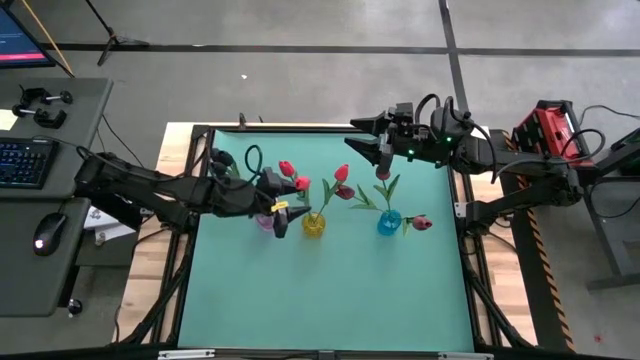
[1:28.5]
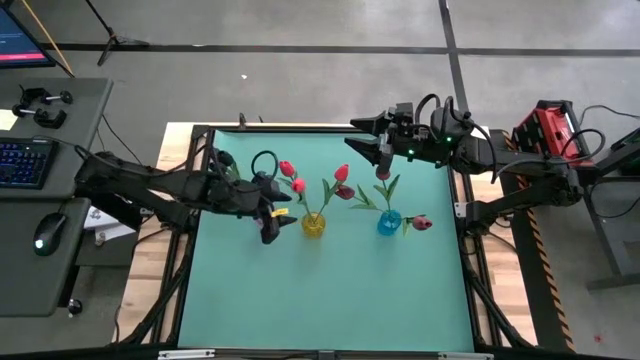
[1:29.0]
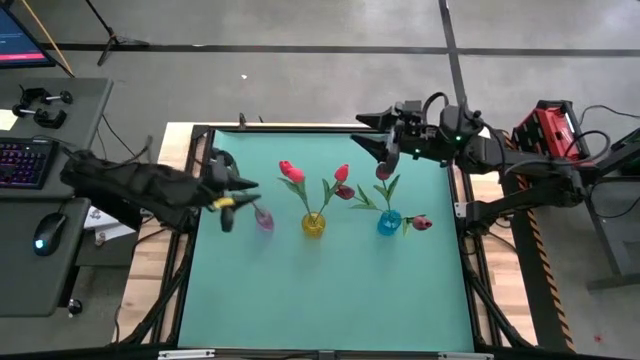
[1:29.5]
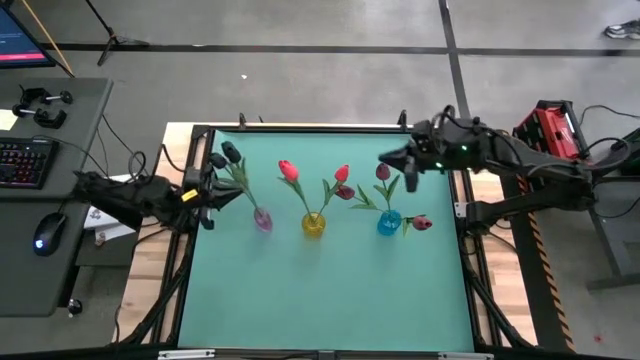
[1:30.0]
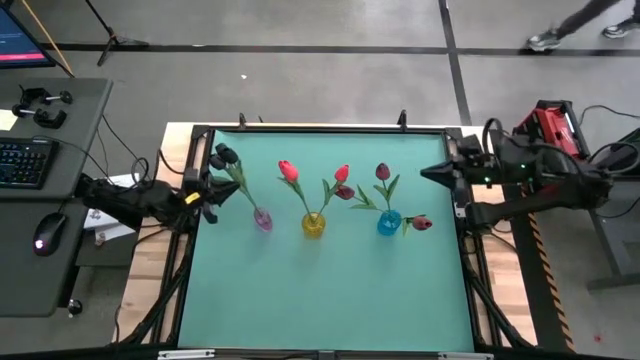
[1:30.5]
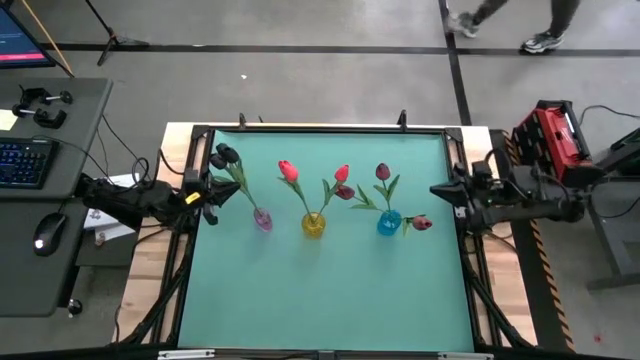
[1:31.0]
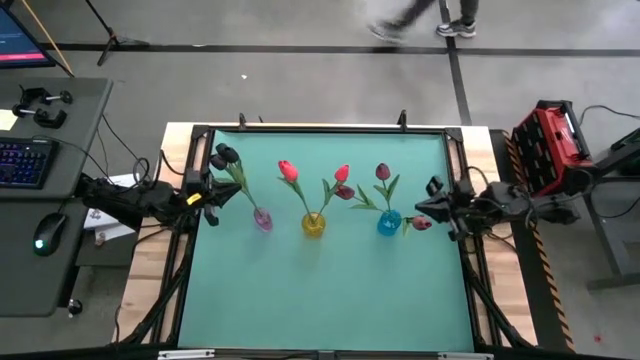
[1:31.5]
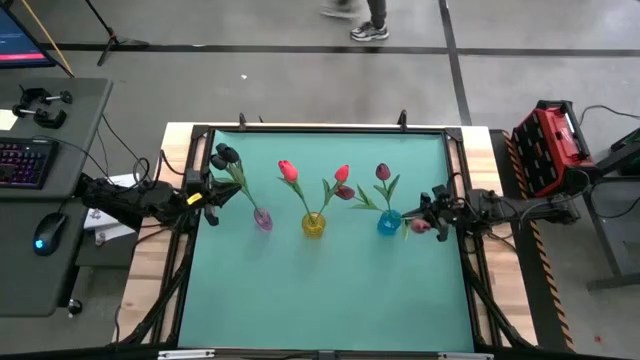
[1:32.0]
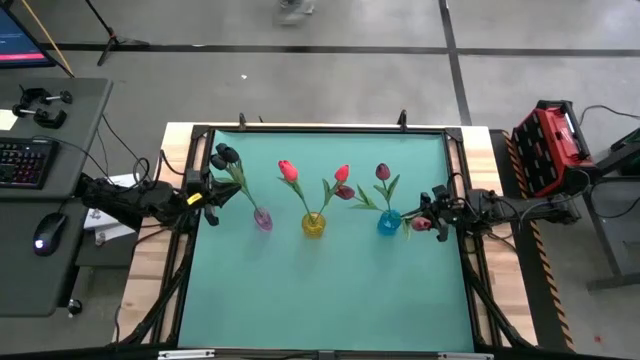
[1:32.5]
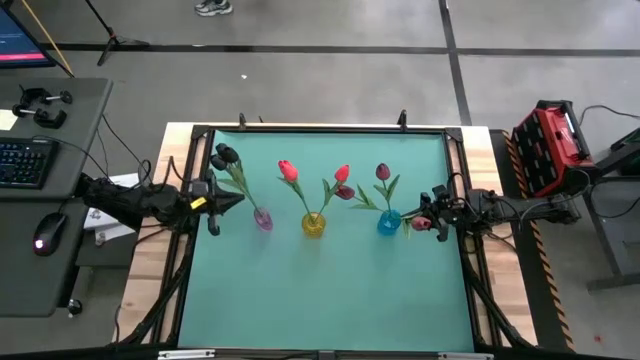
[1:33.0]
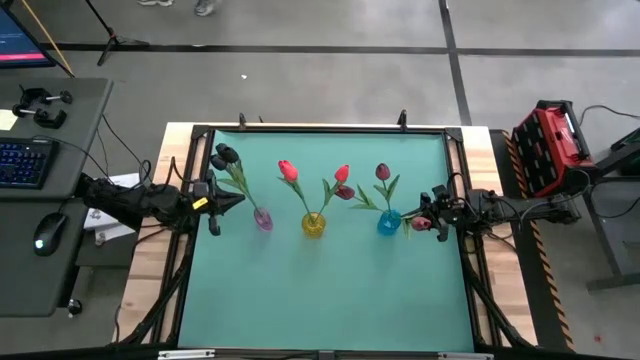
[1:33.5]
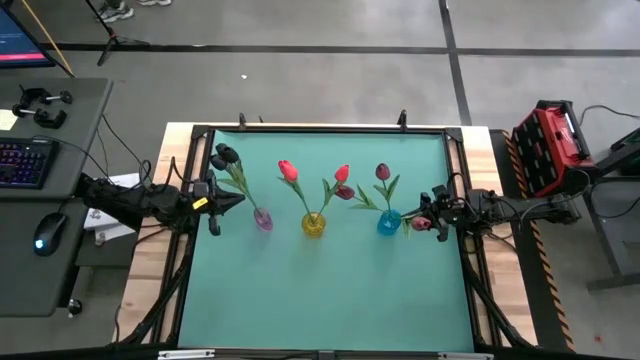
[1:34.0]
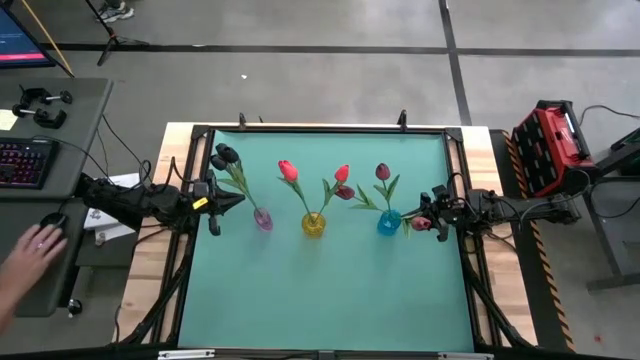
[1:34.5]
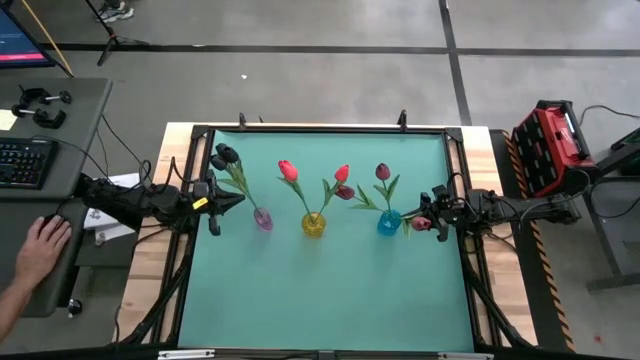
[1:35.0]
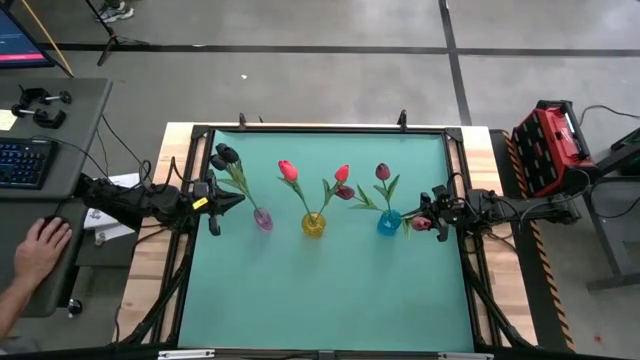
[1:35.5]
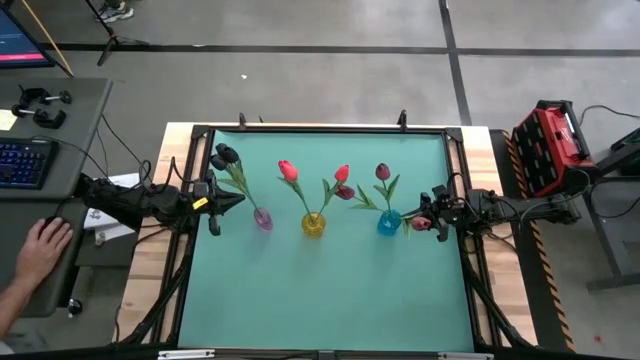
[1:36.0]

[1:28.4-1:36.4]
Task: Sort flowers into vase by color
Return to Home Position

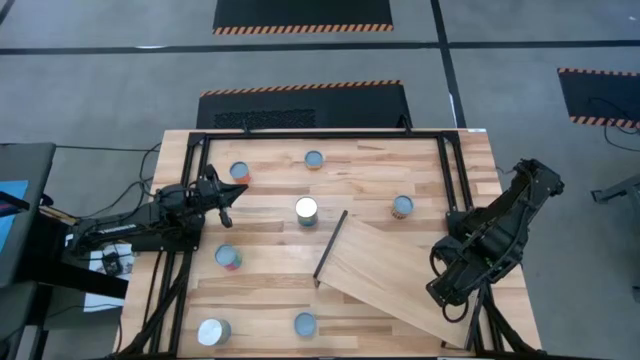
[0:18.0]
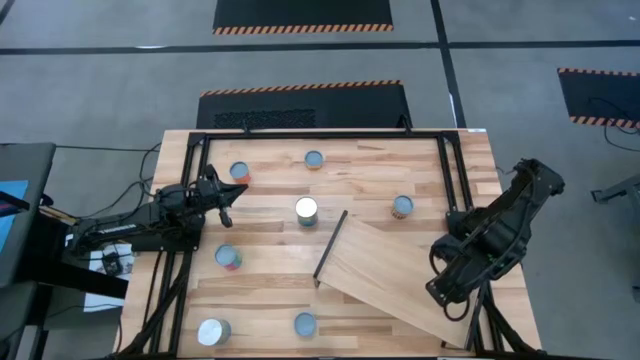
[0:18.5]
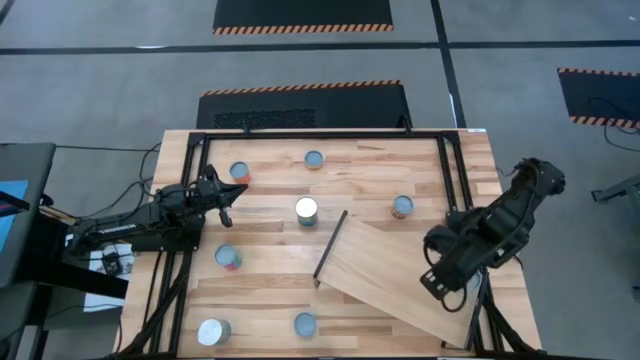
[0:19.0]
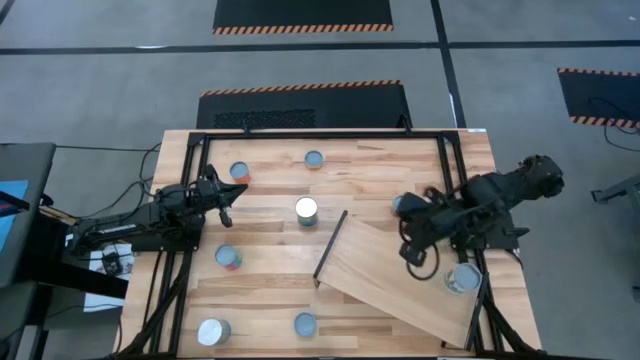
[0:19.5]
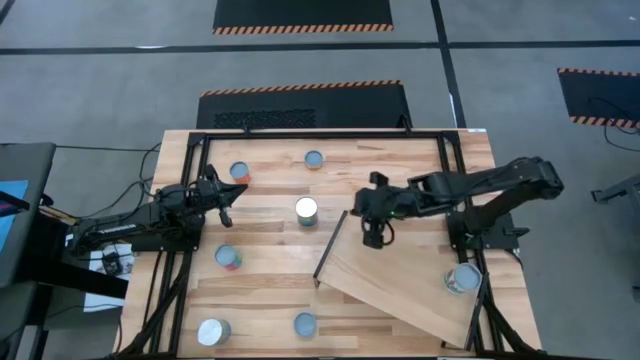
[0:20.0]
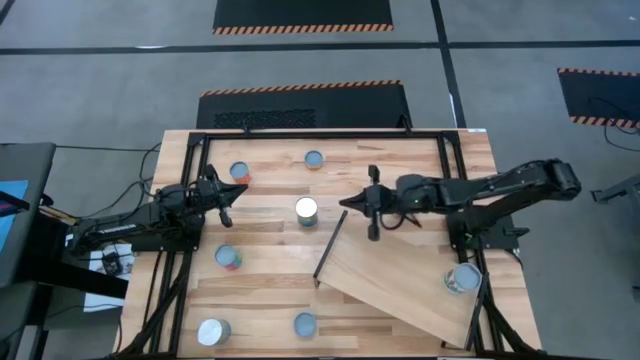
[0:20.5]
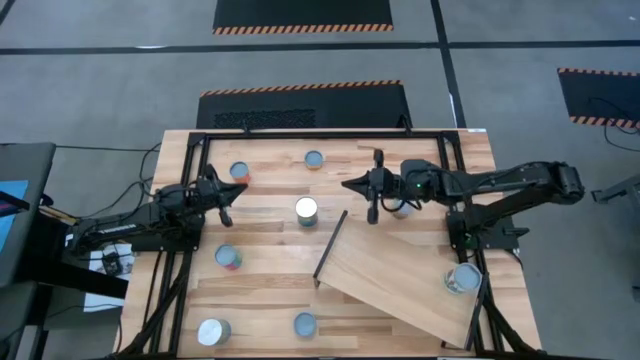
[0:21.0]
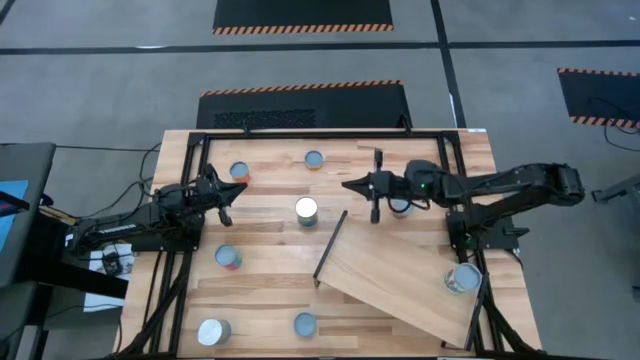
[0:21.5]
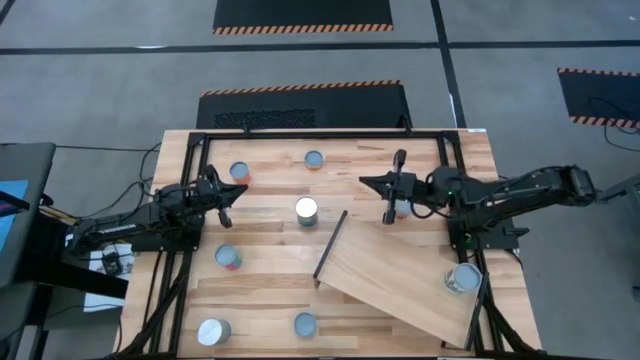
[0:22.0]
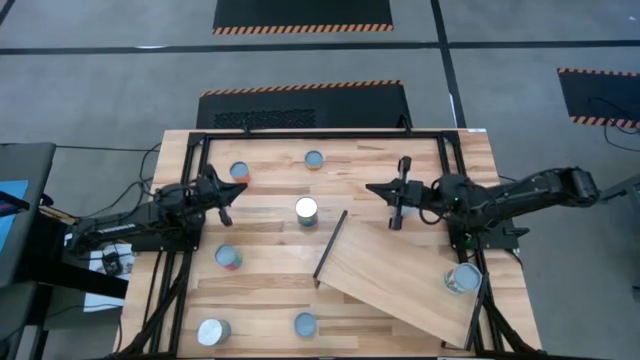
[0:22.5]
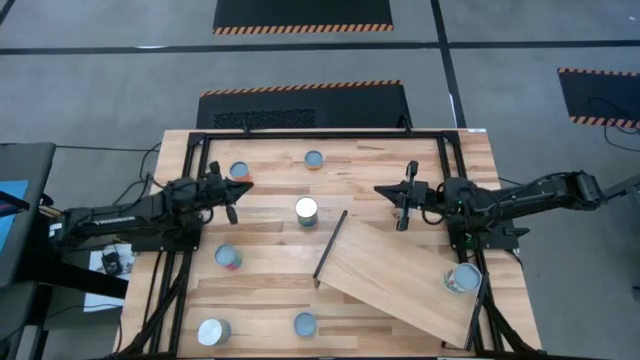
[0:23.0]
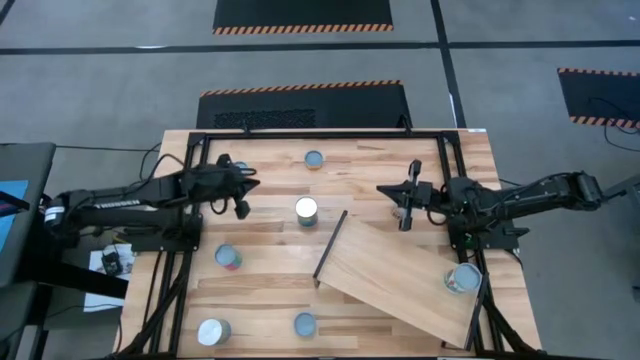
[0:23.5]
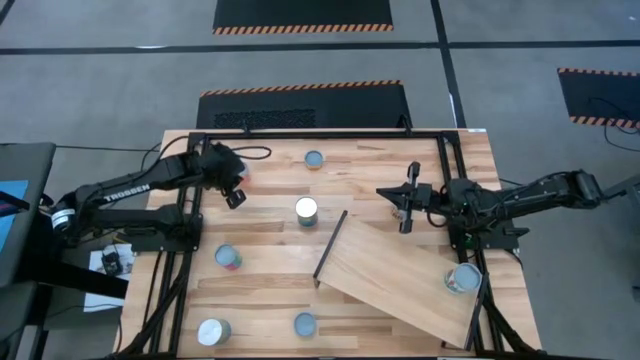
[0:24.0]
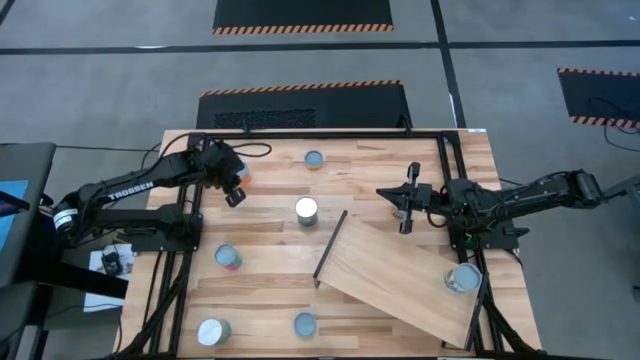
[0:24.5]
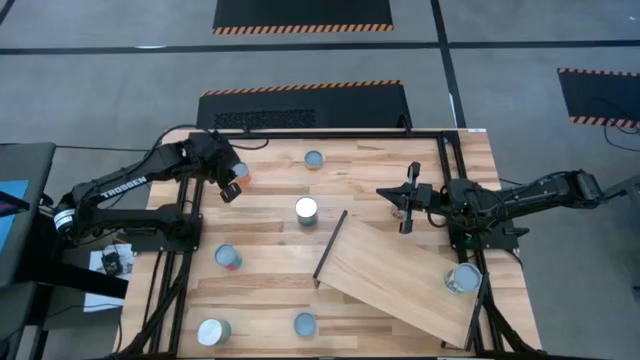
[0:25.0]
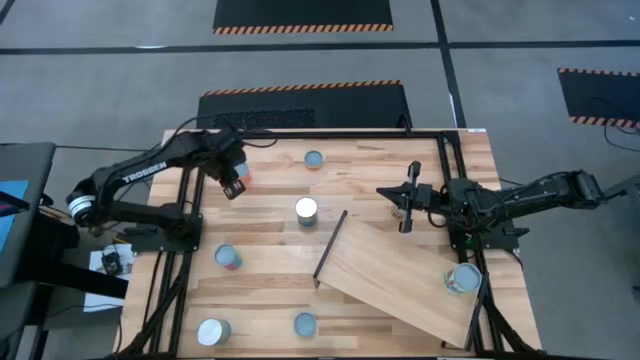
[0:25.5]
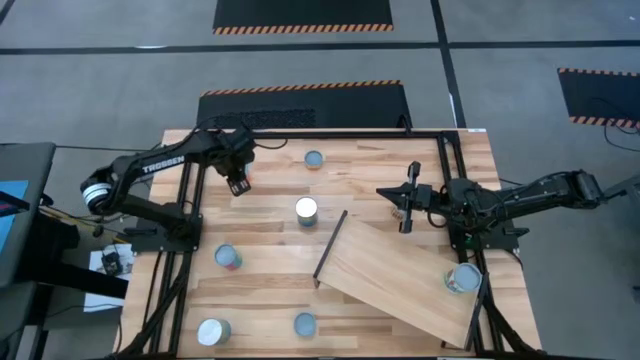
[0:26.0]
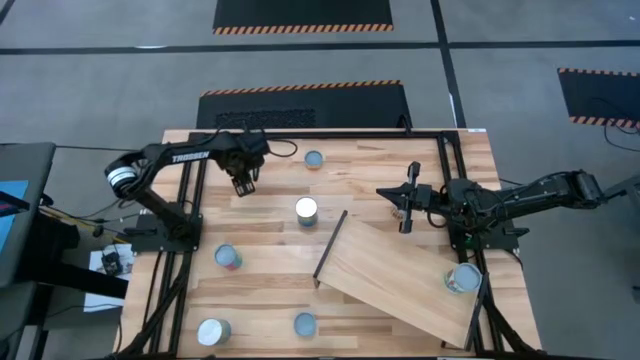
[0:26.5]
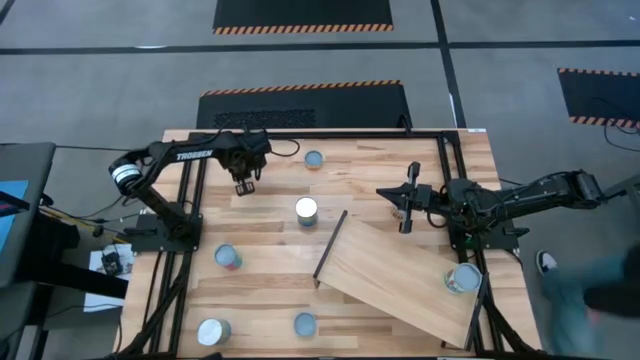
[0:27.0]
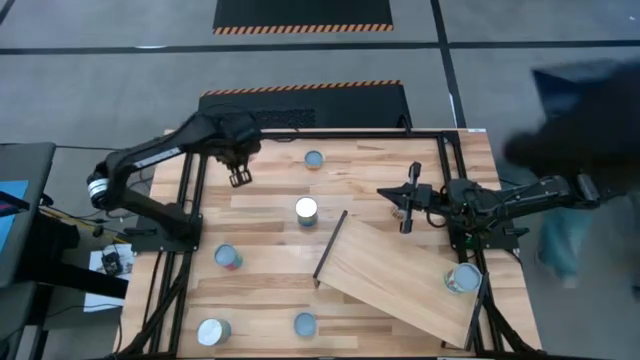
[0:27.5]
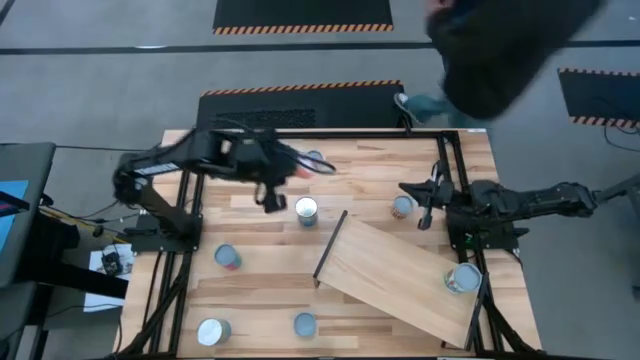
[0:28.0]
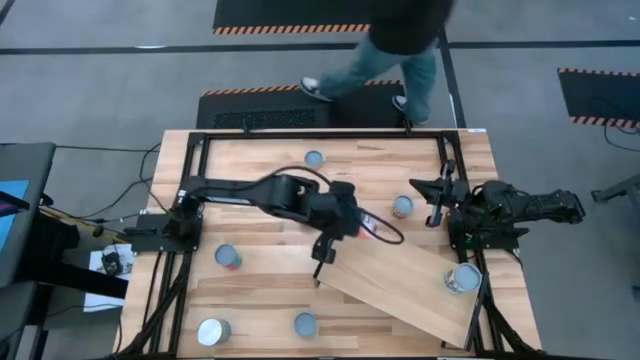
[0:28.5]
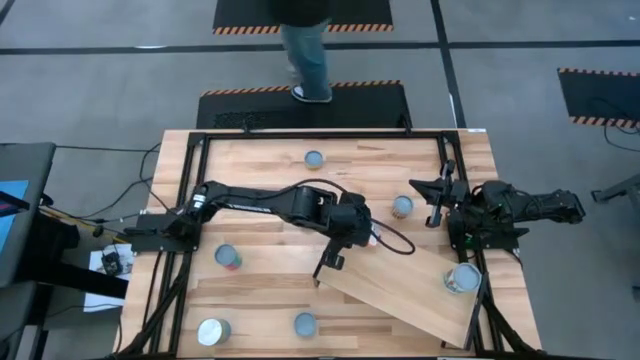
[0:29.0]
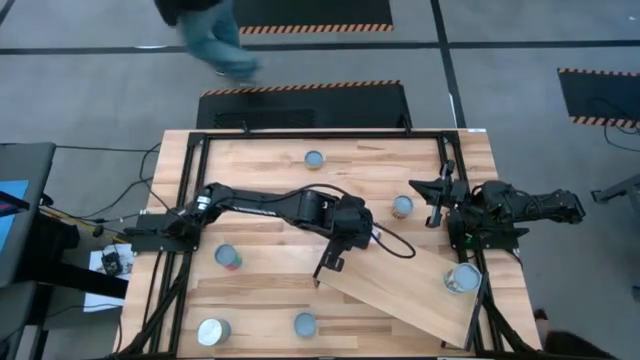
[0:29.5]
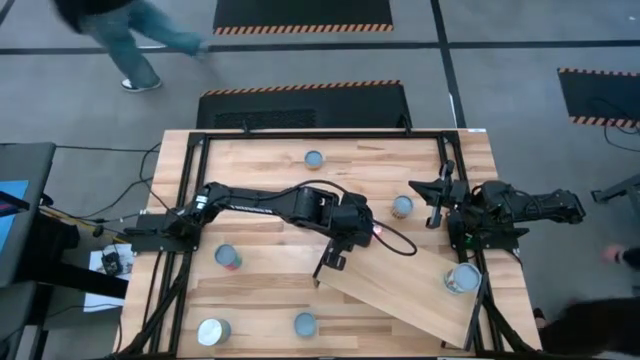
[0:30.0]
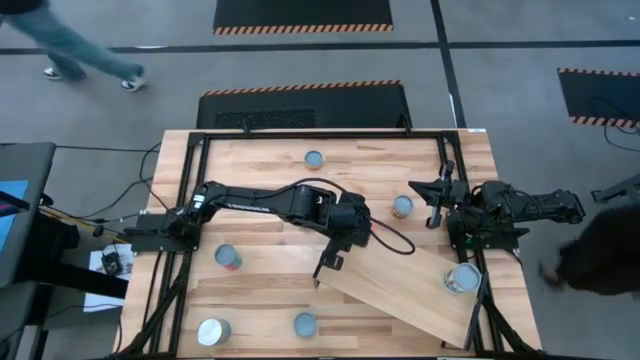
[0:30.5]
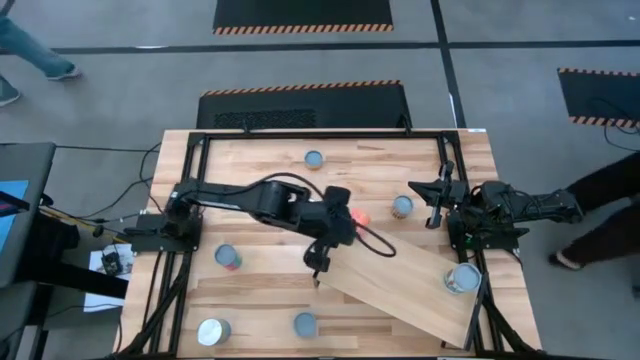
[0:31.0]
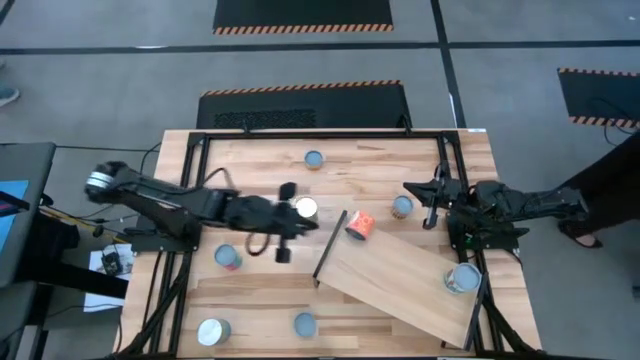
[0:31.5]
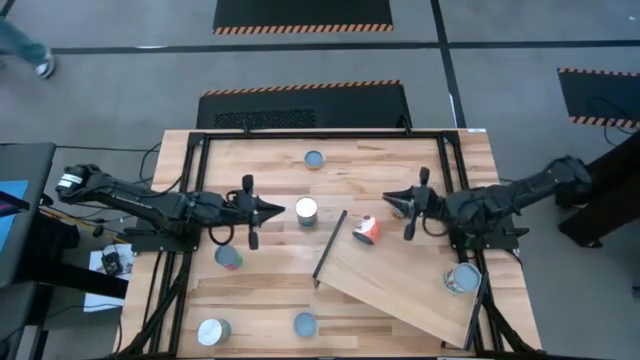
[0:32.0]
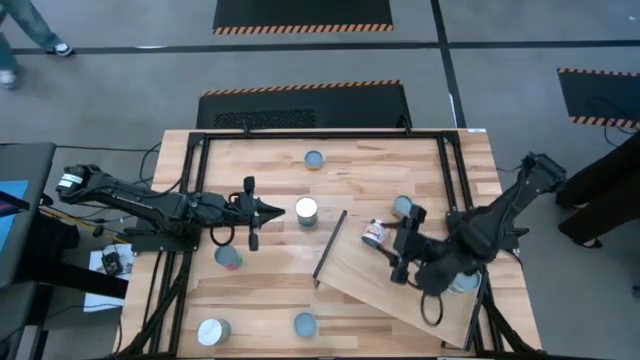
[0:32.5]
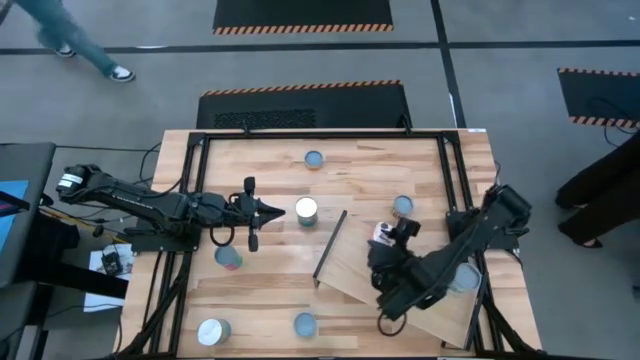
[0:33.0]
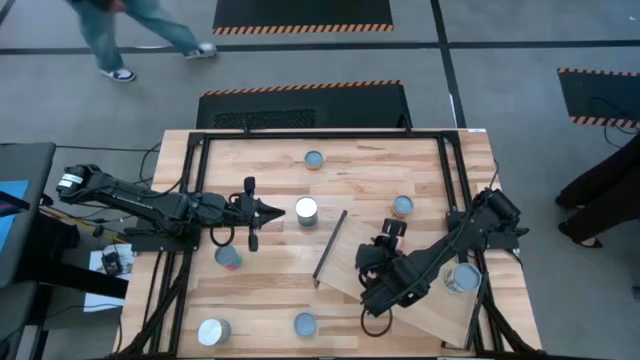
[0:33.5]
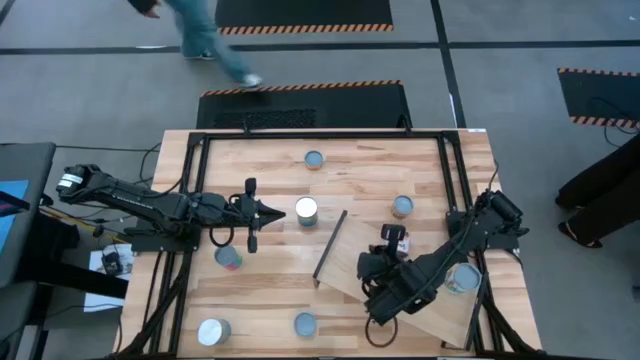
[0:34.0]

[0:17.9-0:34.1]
Task: Pick and place cans onto a shelf
Put the canned tomatoes on the shelf
